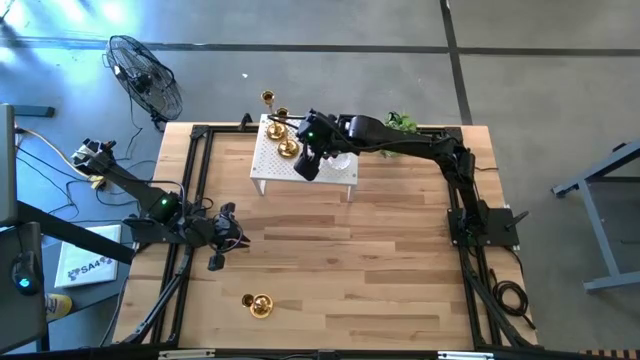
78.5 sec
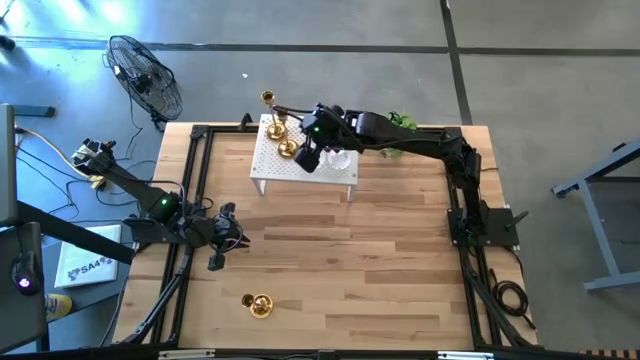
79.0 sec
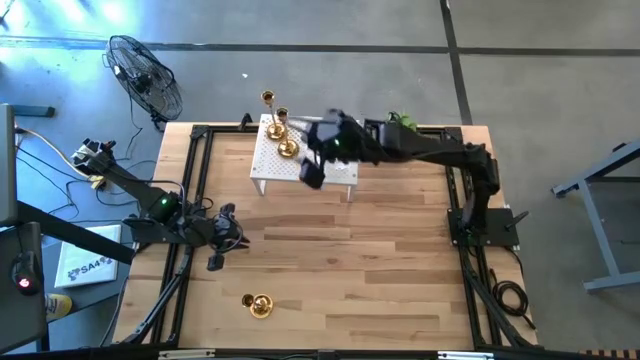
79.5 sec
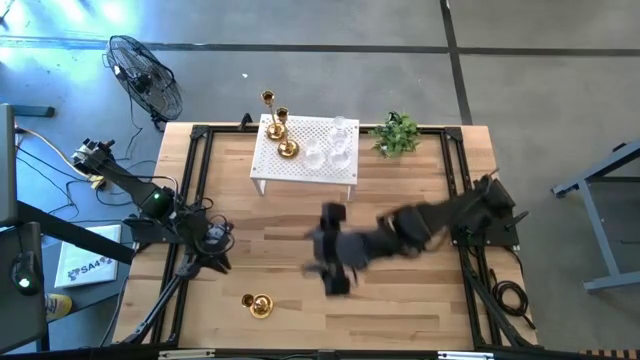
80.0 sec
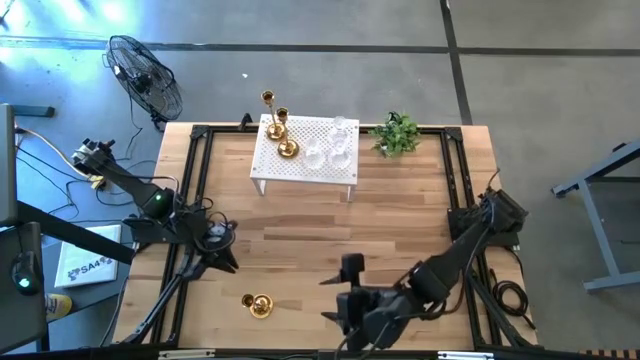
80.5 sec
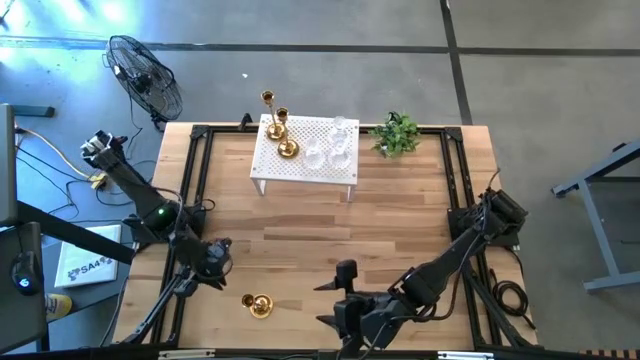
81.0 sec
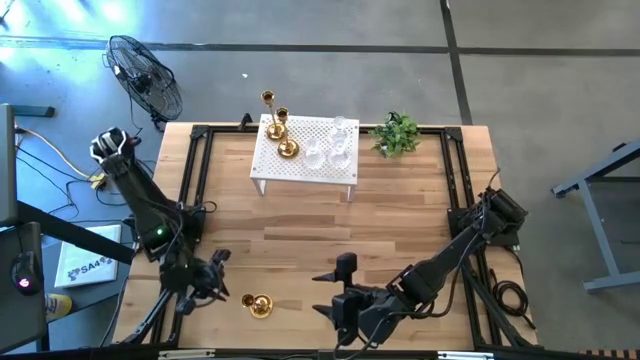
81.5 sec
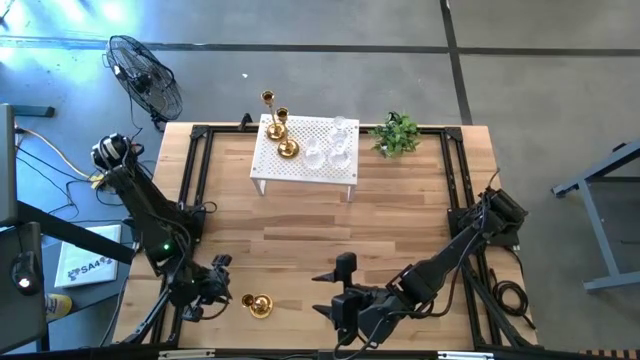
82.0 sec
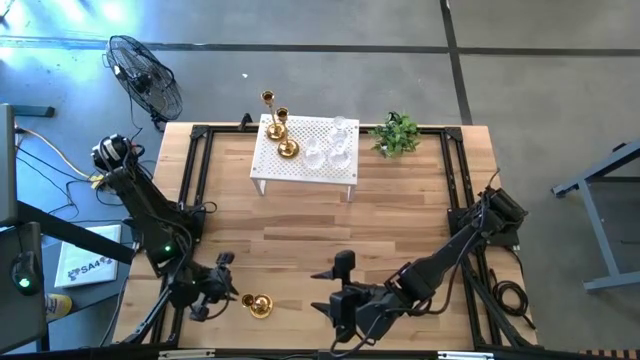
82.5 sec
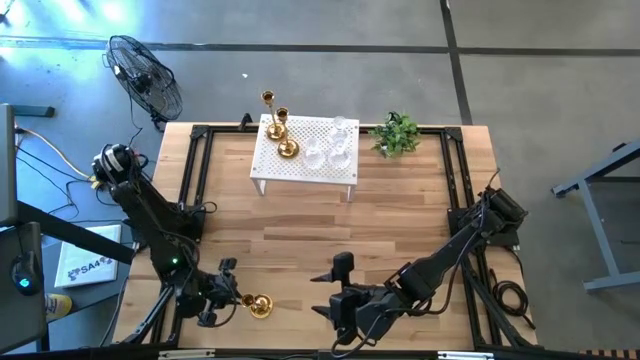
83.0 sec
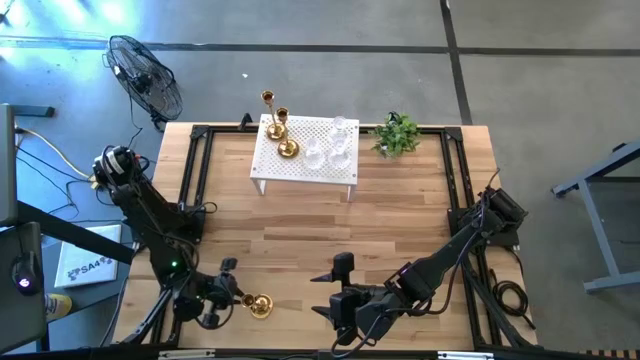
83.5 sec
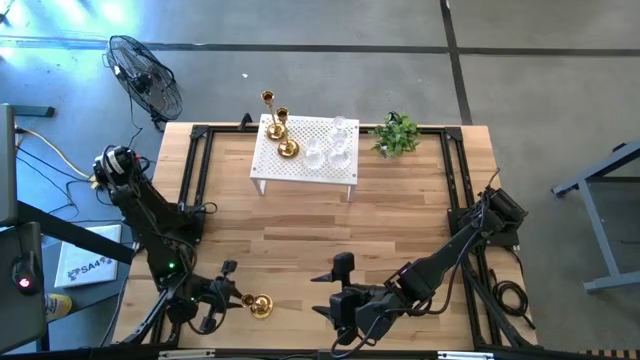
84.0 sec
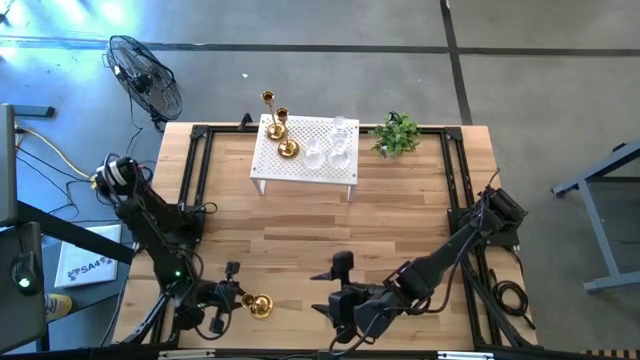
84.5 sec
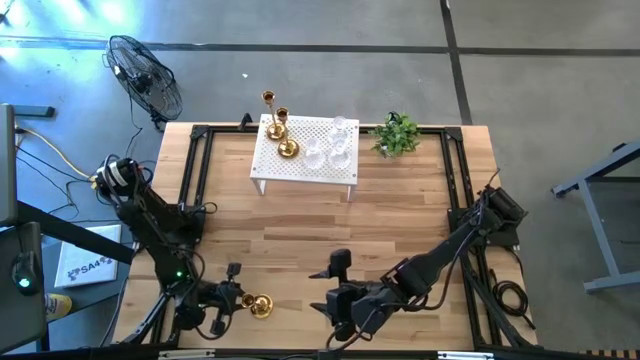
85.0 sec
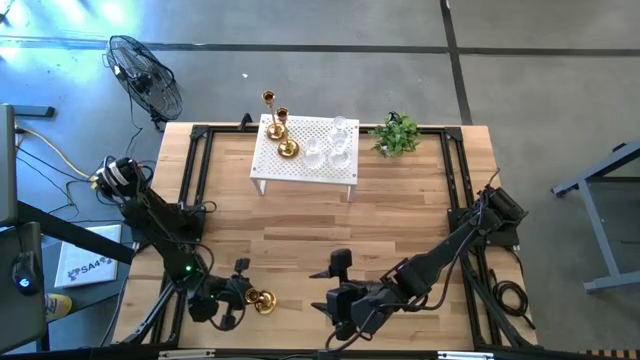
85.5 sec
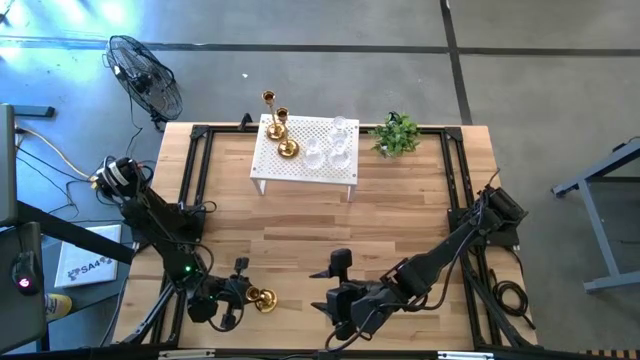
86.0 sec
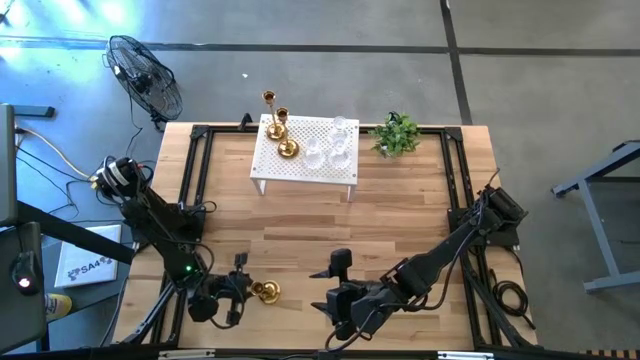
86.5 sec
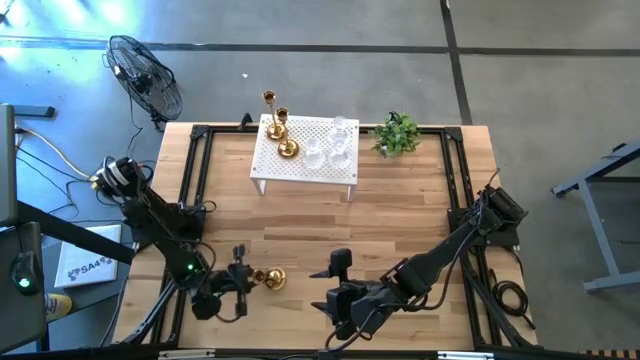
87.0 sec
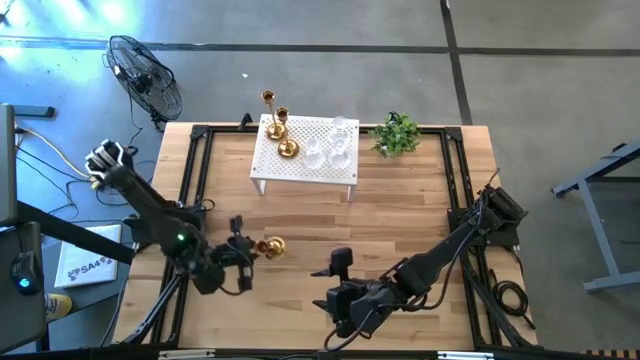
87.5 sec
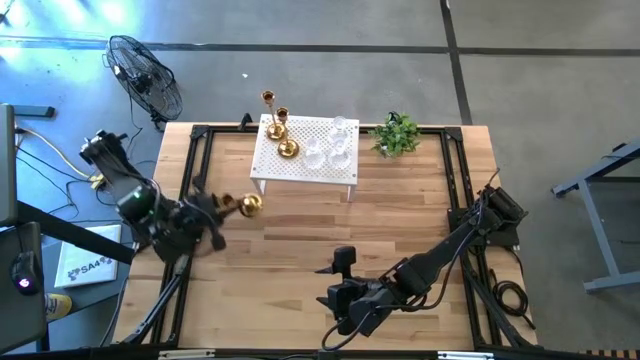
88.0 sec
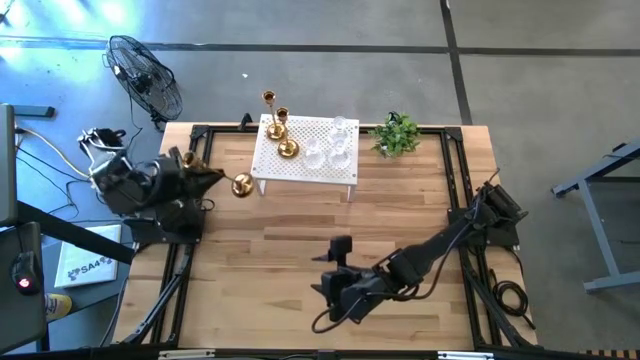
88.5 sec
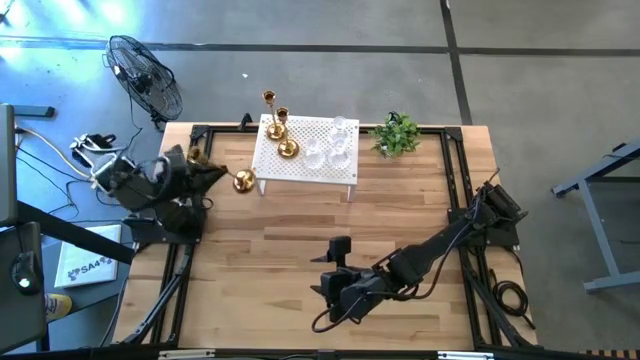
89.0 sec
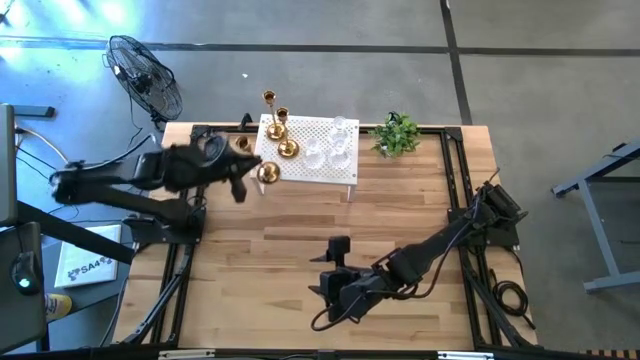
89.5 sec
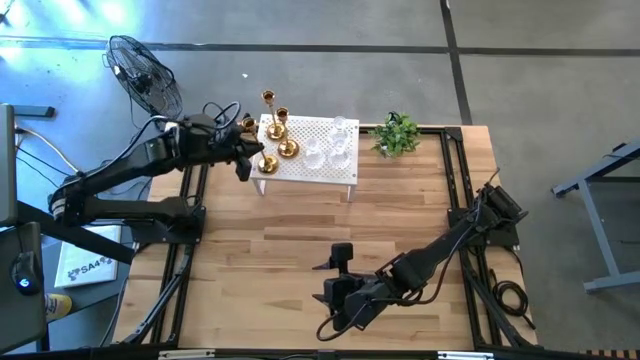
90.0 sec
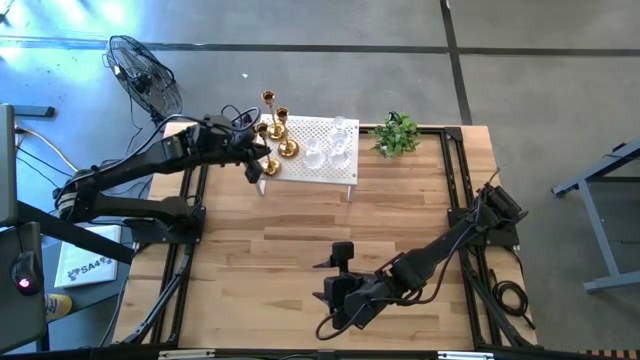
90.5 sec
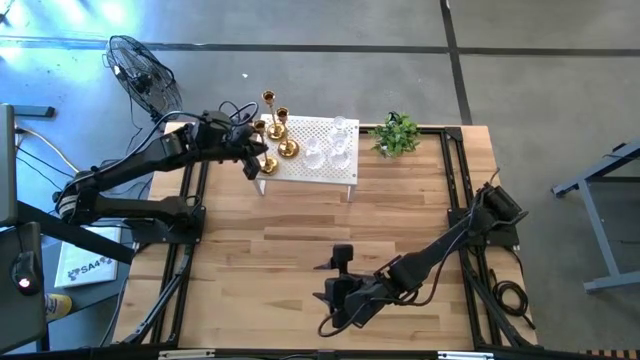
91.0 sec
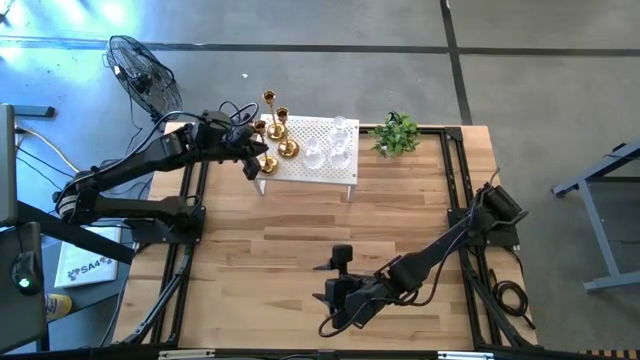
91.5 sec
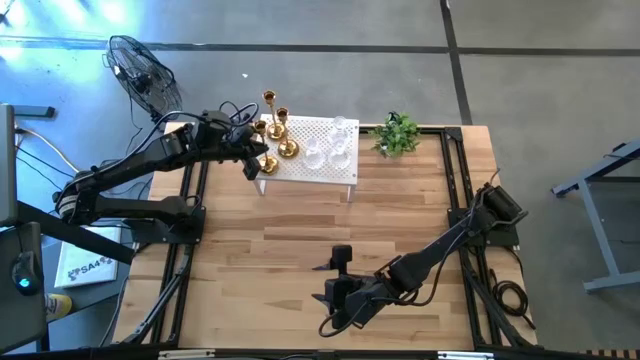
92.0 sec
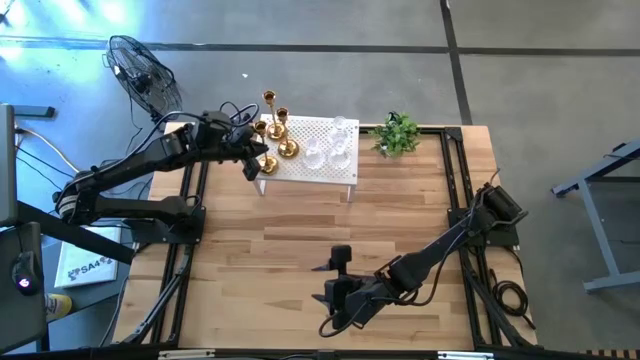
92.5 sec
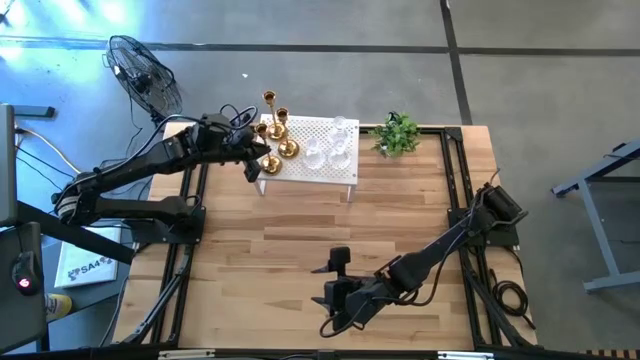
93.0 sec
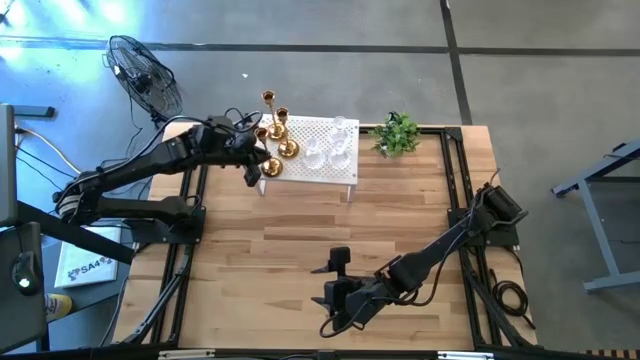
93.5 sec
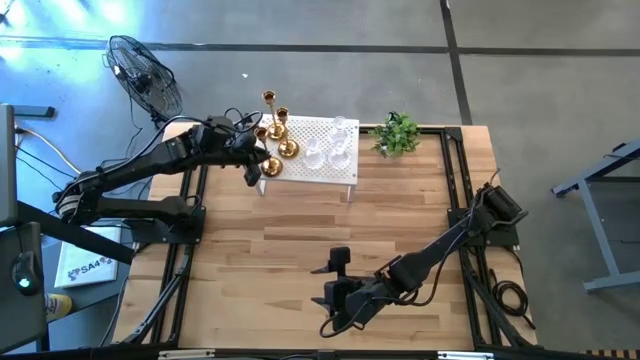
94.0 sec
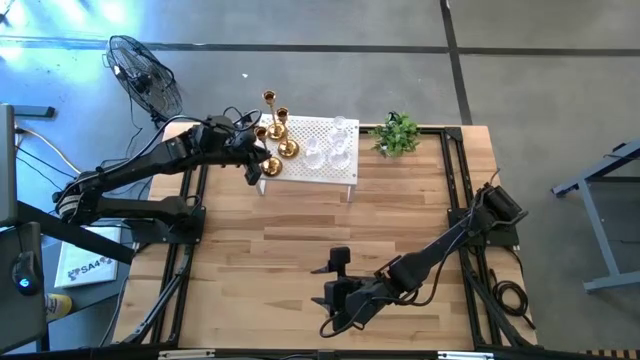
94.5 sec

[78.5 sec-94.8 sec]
Task: Pick & Place candle stick holders
Put the gold candle holder on the shelf aligned with the other gold candle holder

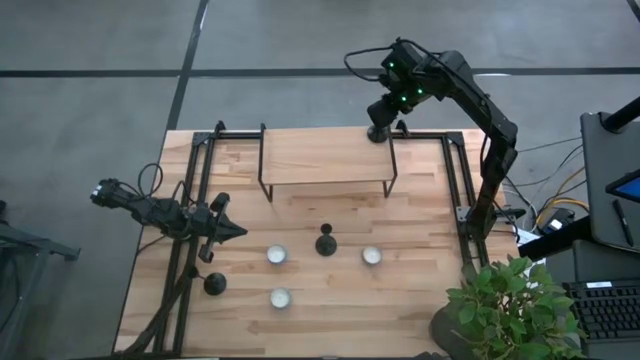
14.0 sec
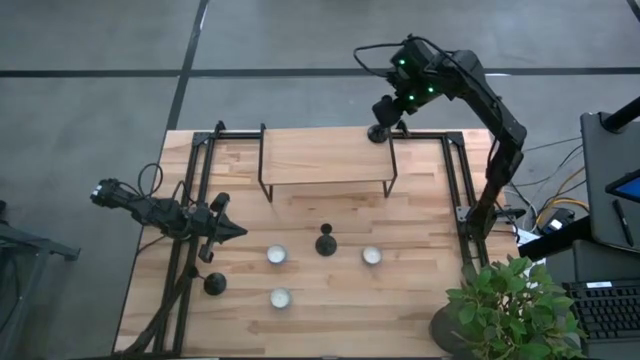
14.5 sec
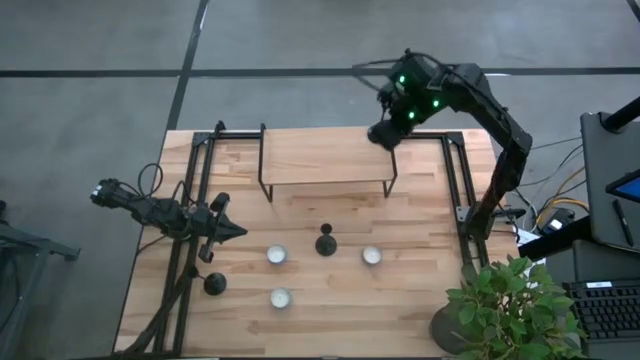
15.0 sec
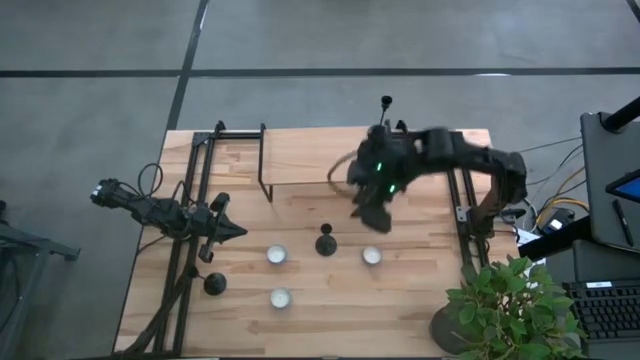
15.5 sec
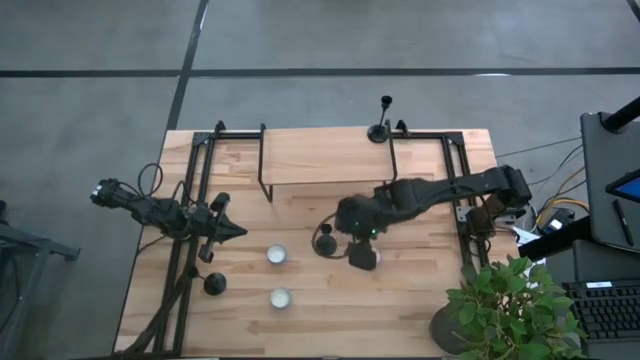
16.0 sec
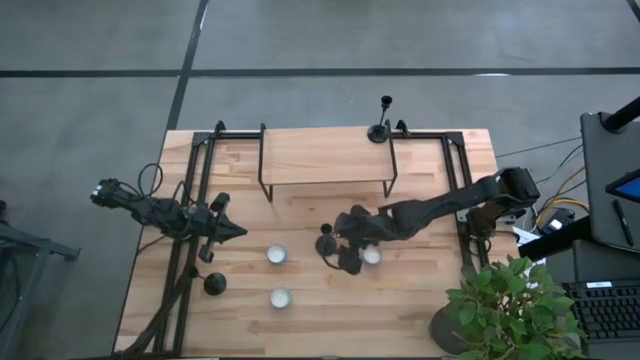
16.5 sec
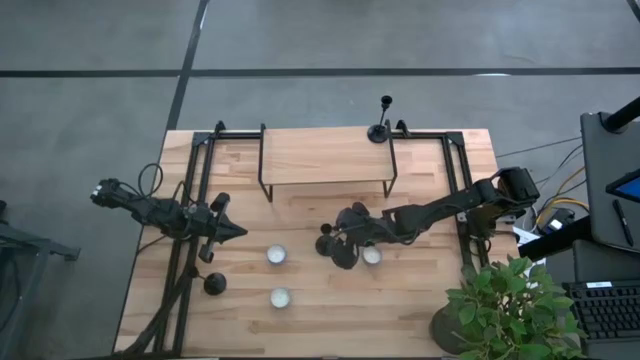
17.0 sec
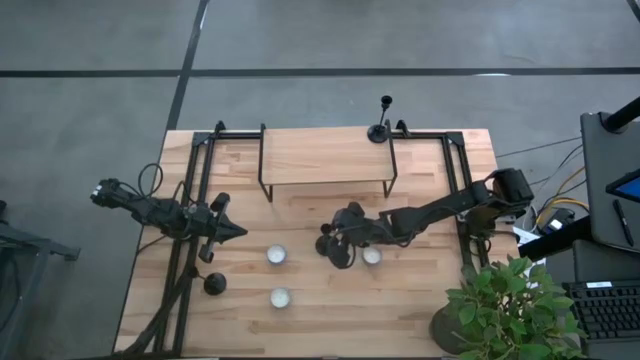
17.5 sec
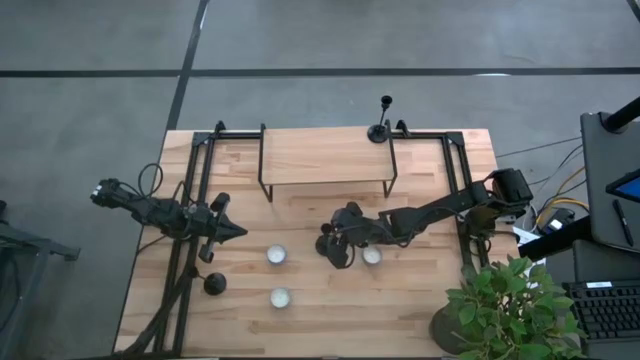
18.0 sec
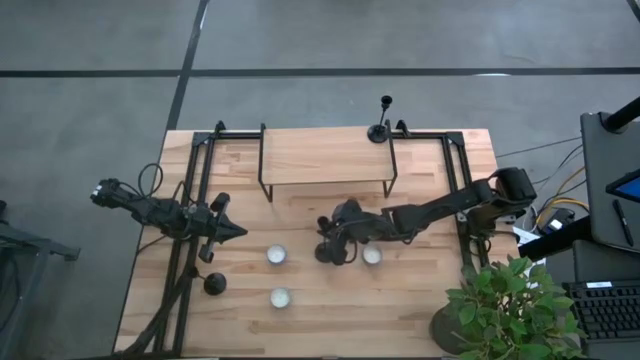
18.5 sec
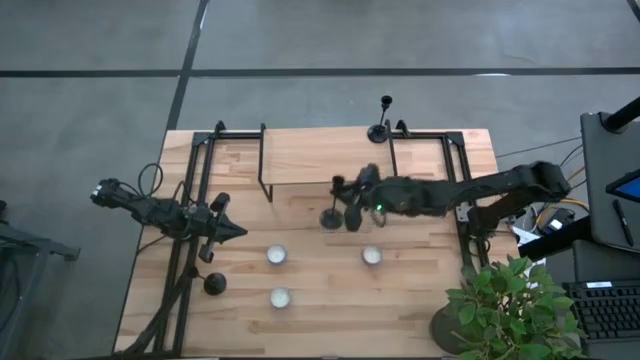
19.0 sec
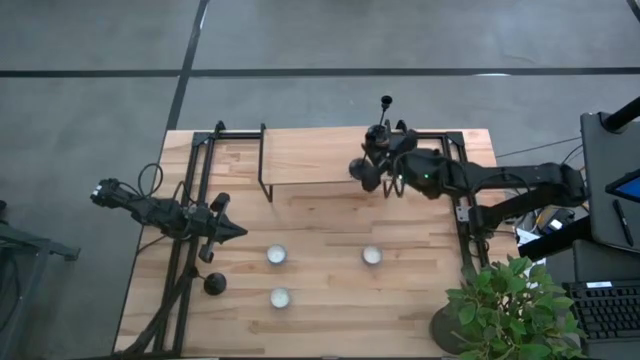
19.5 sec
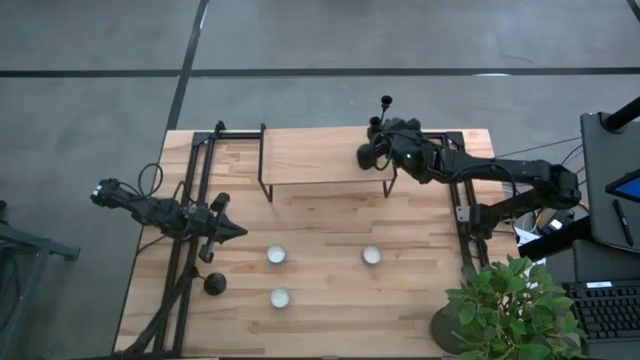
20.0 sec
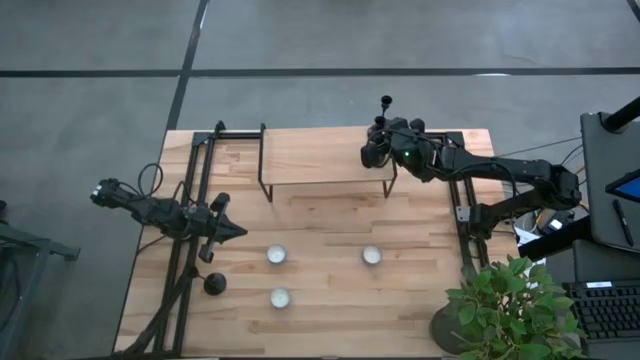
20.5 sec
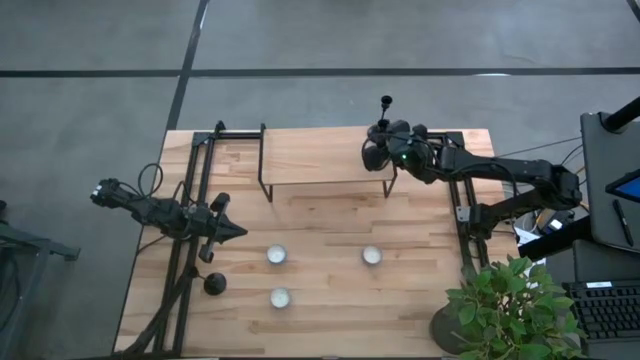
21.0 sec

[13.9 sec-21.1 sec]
Task: Pick & Place candle stick holders
Put the top black candle holder on the shelf aligned with the other candle holder
